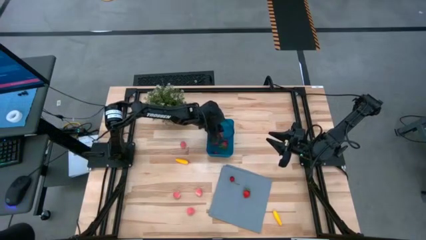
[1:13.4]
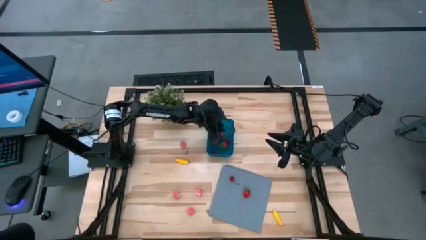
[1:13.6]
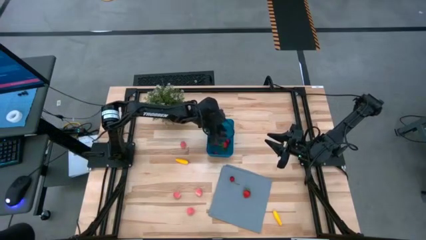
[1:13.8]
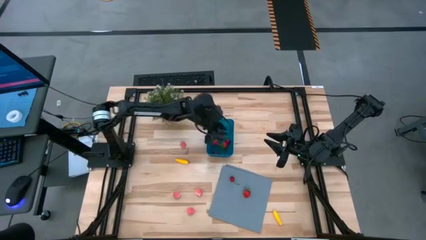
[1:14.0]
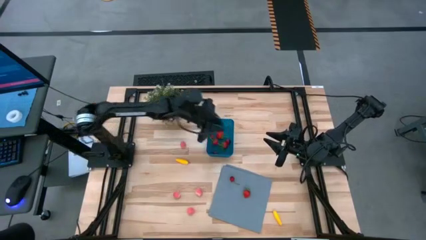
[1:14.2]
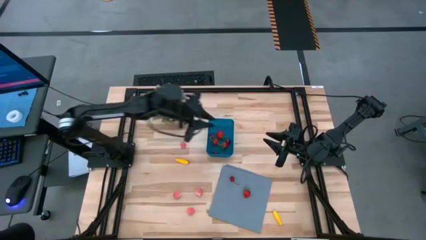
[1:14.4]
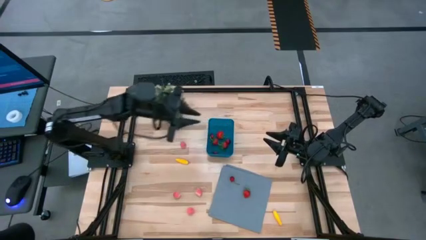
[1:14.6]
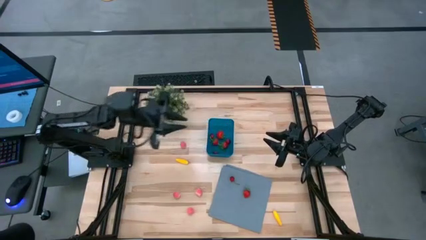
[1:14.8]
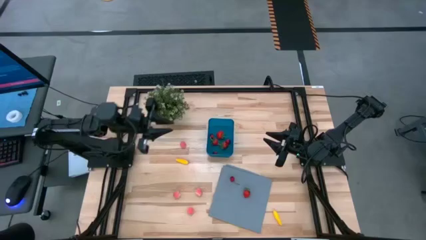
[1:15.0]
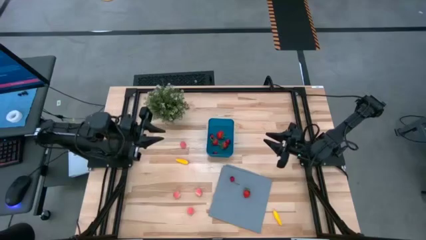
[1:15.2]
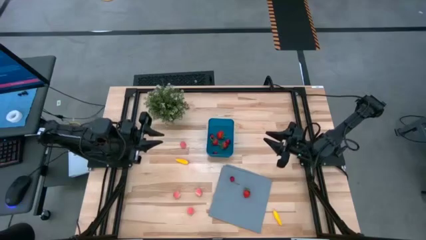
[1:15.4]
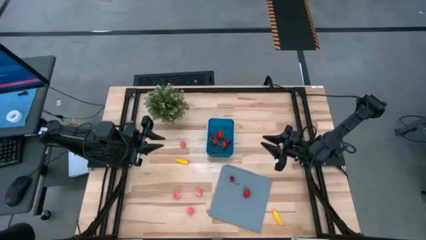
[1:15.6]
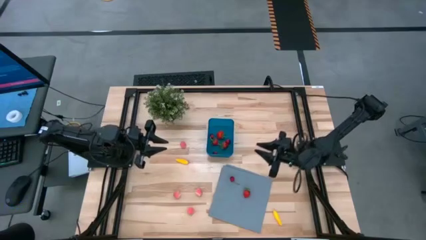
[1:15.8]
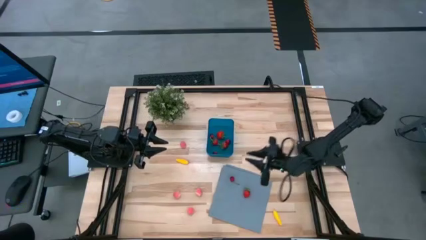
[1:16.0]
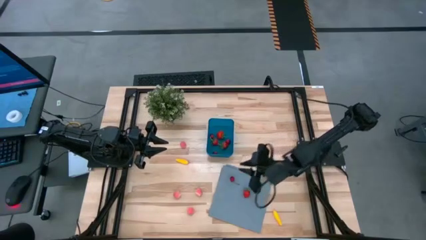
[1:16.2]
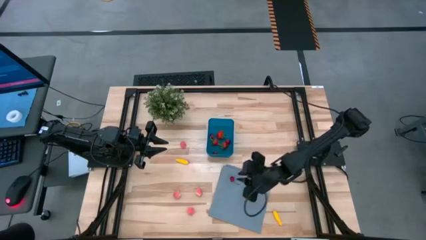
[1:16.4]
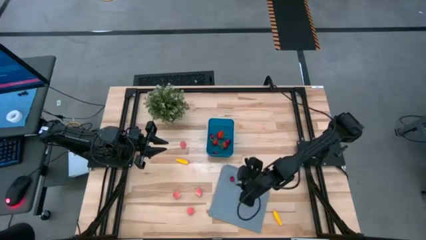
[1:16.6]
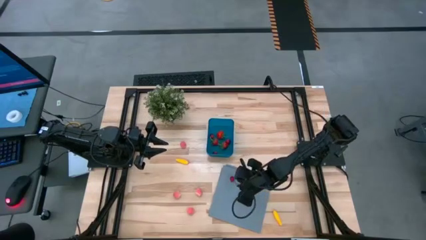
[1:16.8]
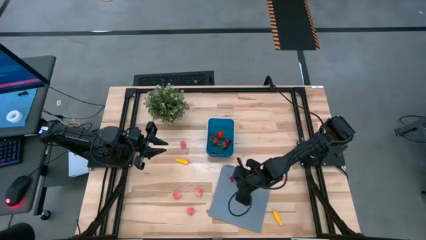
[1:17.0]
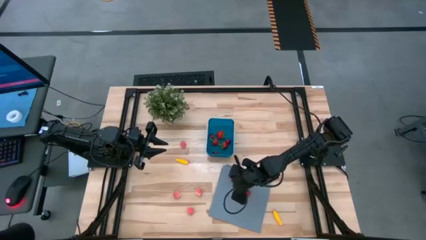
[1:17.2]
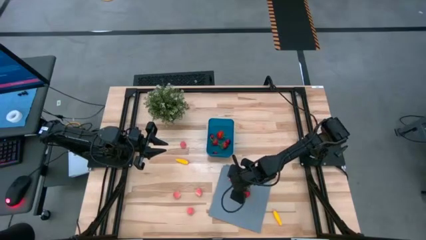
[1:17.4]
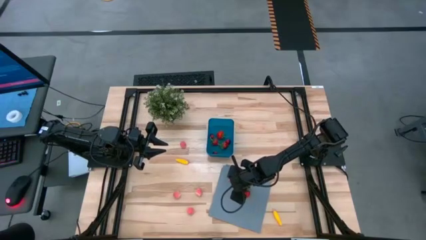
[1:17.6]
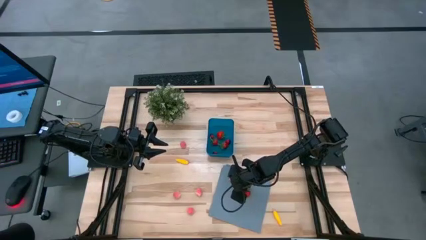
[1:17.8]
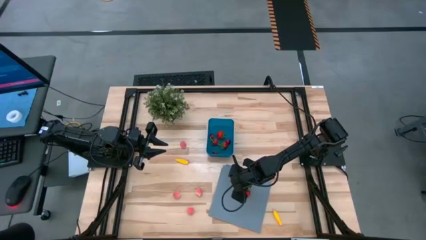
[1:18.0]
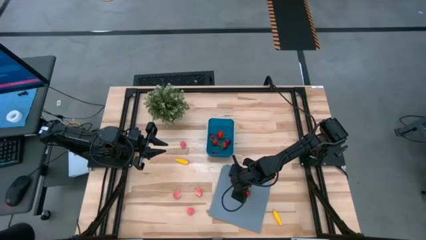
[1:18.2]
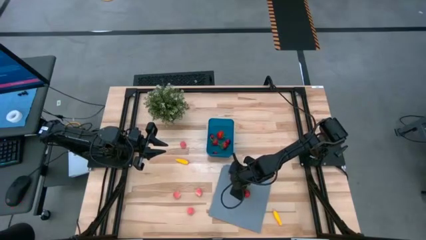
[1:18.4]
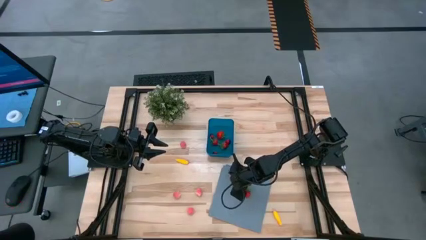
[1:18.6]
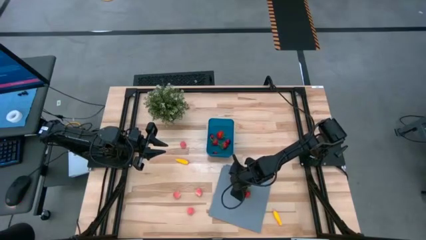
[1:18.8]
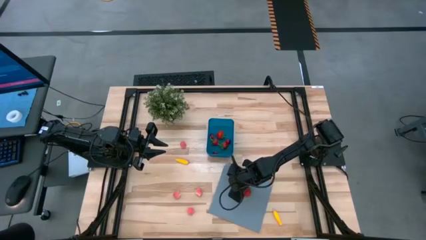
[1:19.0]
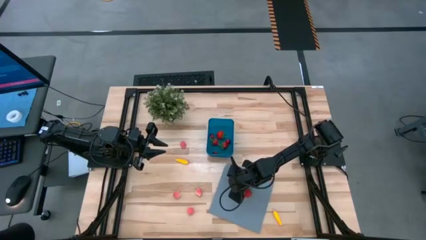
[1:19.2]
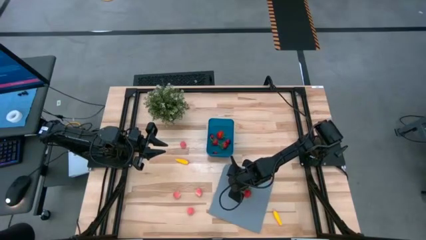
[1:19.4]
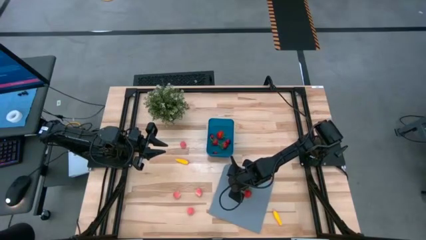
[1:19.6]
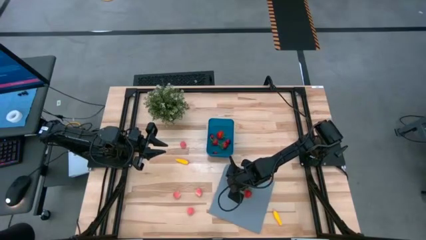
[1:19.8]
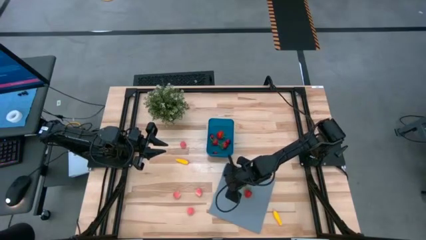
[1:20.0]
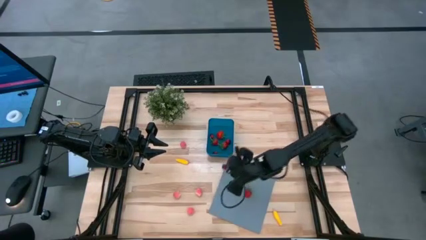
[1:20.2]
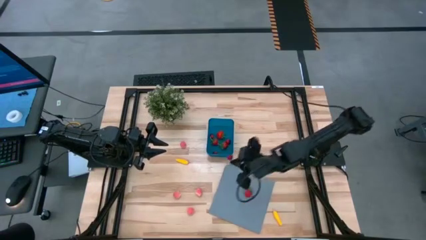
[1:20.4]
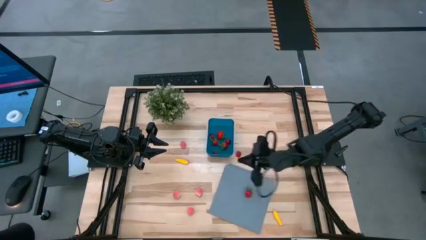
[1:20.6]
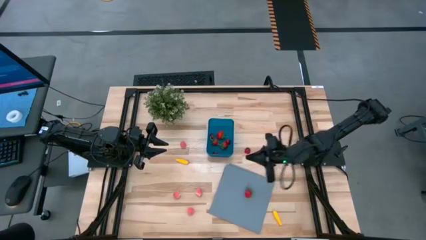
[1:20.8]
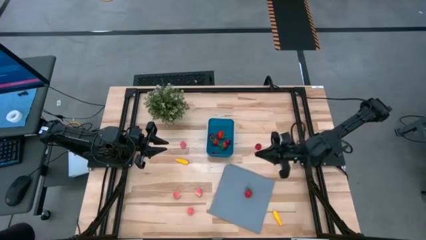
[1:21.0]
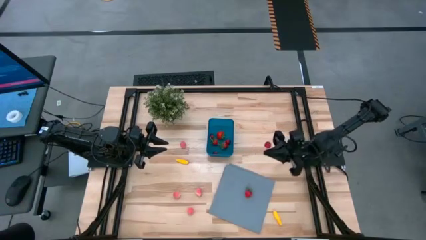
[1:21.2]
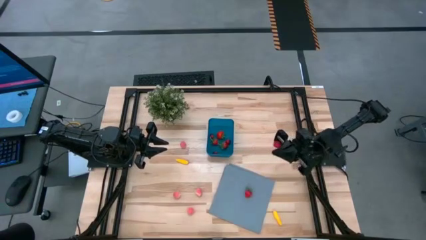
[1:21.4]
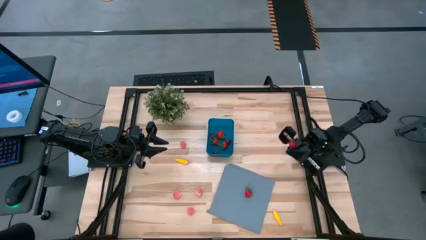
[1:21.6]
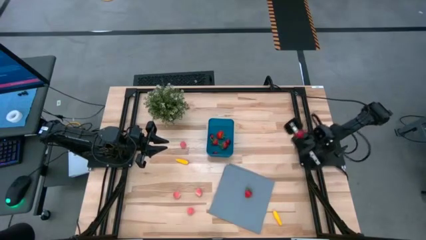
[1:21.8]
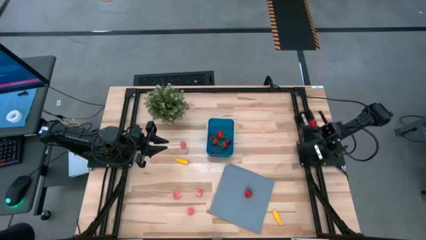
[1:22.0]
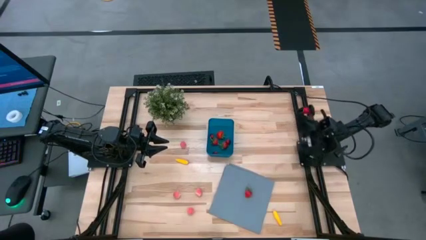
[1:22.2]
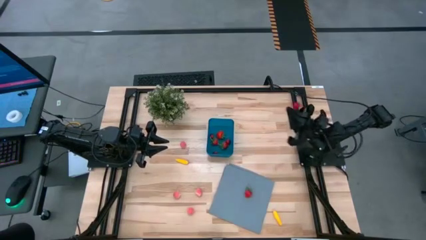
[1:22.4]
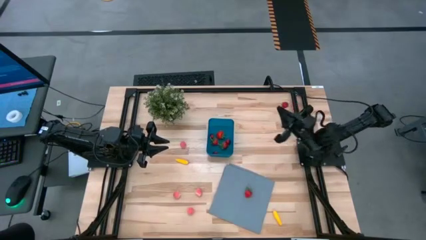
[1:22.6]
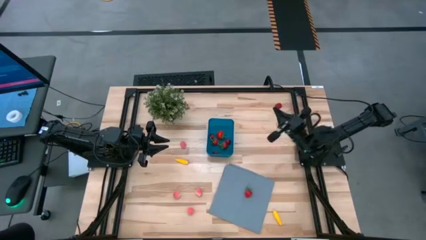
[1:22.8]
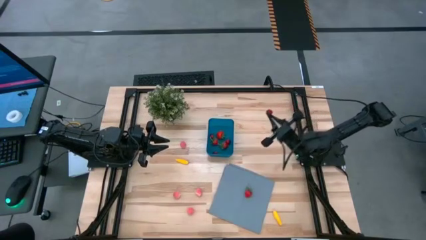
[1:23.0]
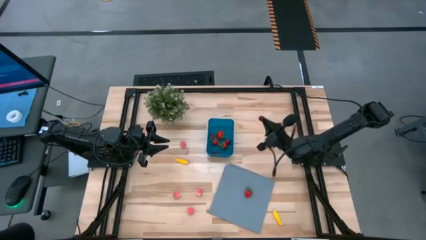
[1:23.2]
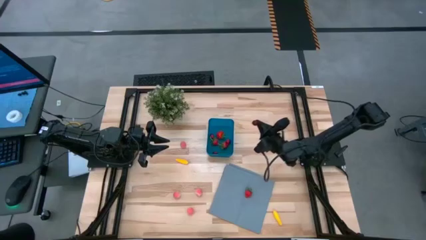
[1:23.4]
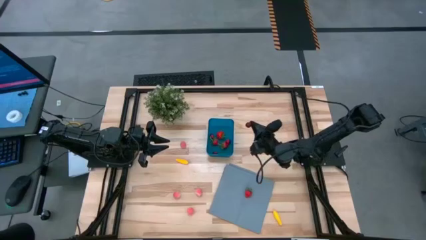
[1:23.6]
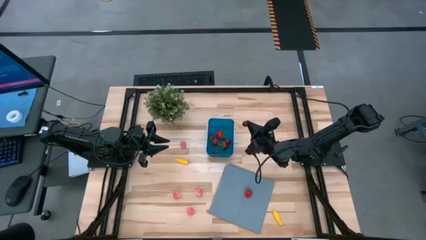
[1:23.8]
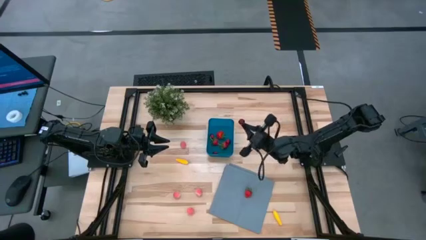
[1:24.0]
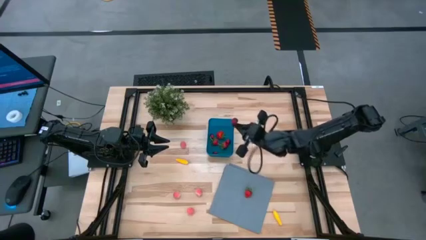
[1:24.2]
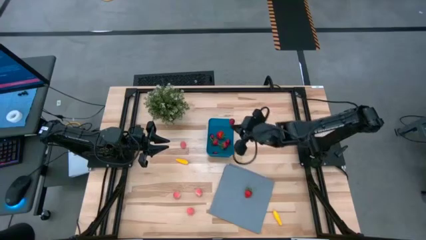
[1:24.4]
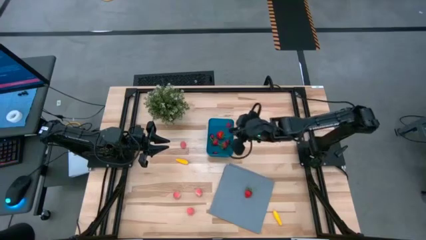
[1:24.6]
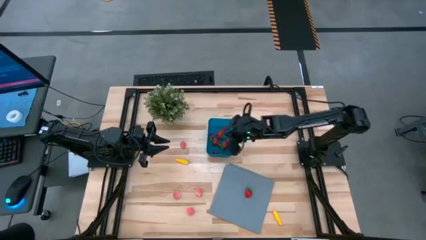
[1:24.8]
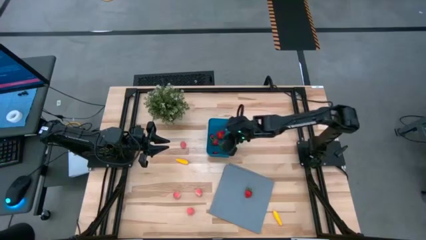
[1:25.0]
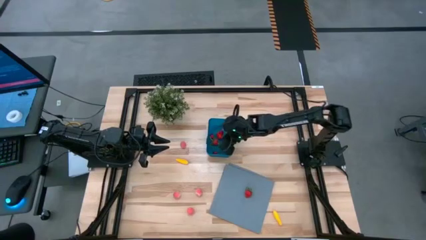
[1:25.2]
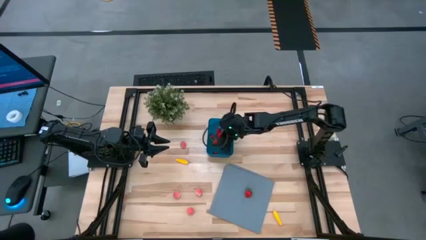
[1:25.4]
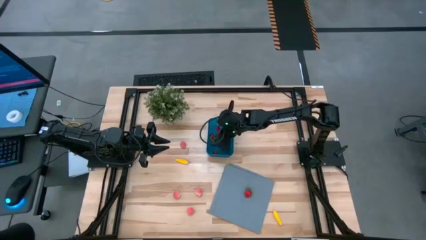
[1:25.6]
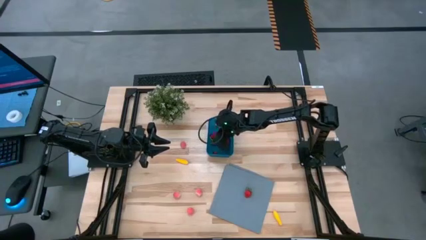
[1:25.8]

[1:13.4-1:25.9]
Task: Pick and placing Produce into tupperware
Put the cherry into the blue bin

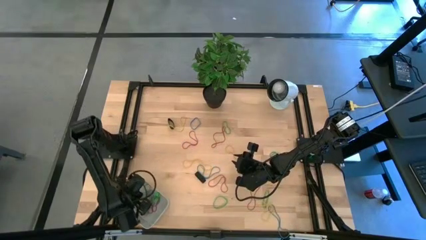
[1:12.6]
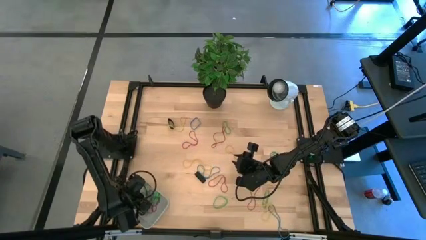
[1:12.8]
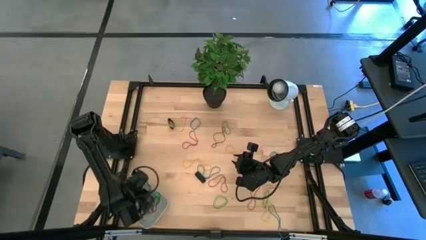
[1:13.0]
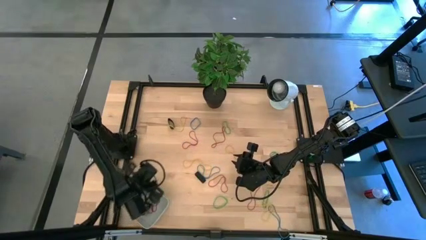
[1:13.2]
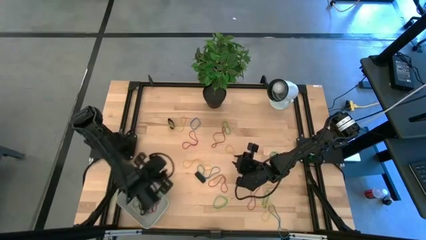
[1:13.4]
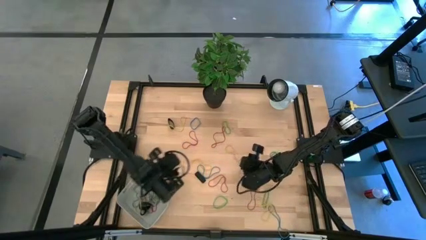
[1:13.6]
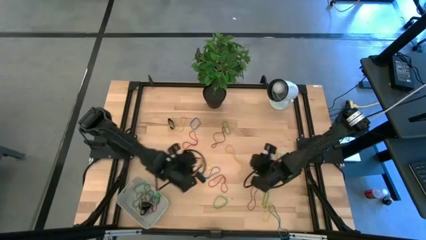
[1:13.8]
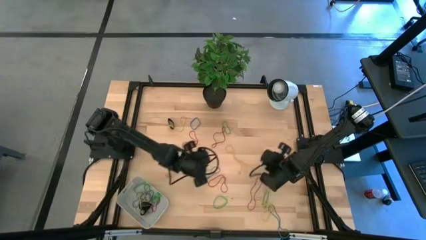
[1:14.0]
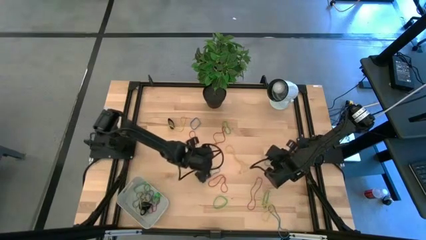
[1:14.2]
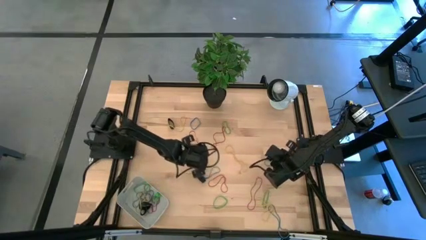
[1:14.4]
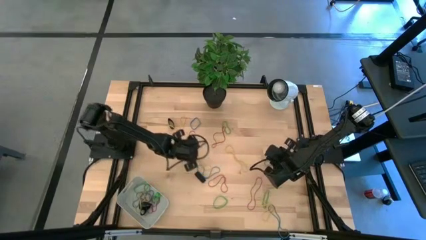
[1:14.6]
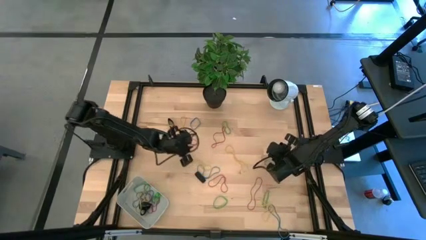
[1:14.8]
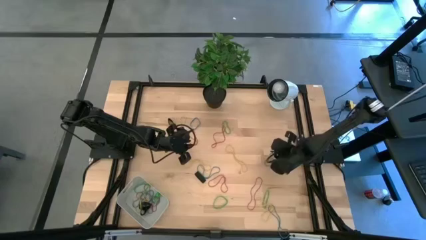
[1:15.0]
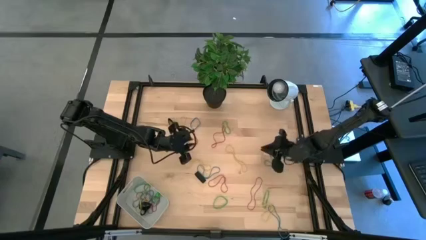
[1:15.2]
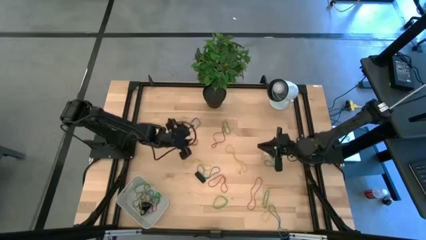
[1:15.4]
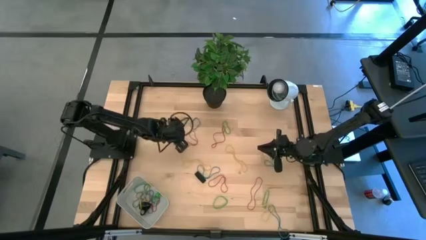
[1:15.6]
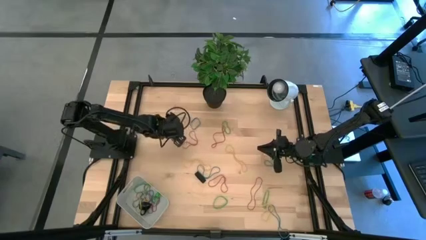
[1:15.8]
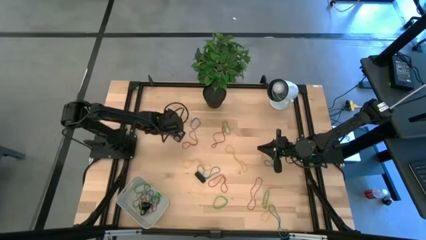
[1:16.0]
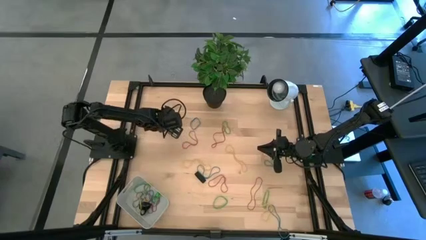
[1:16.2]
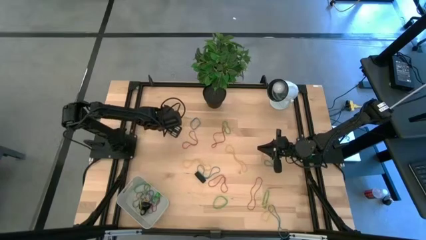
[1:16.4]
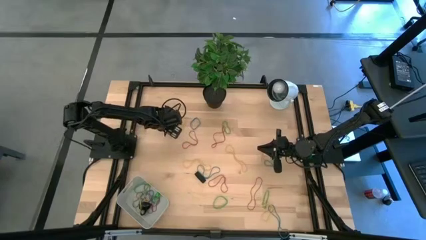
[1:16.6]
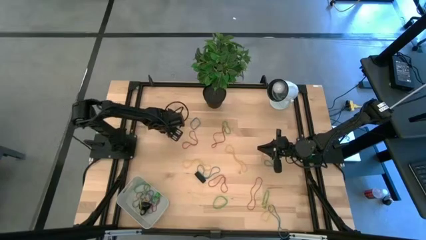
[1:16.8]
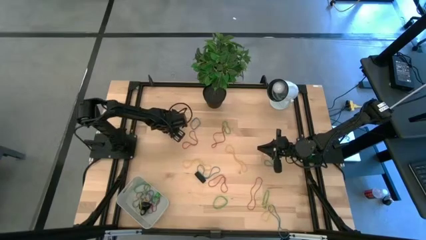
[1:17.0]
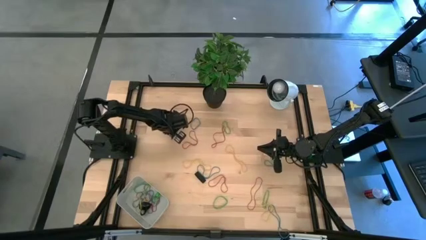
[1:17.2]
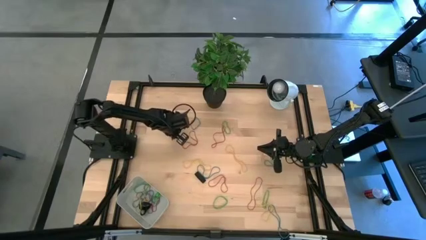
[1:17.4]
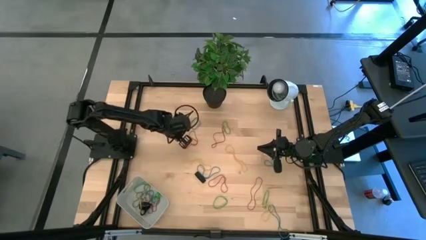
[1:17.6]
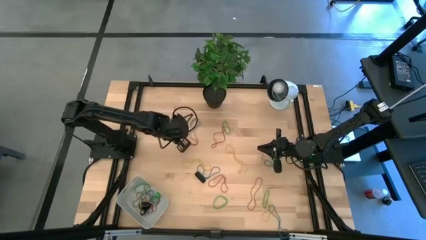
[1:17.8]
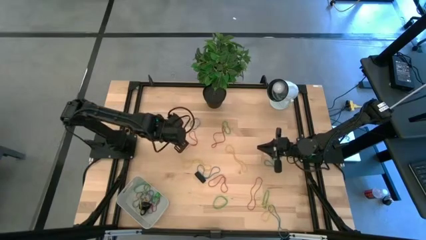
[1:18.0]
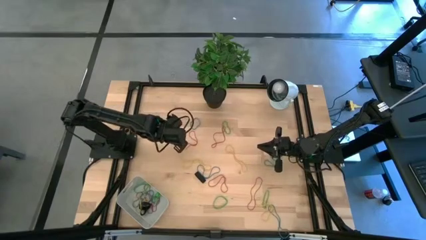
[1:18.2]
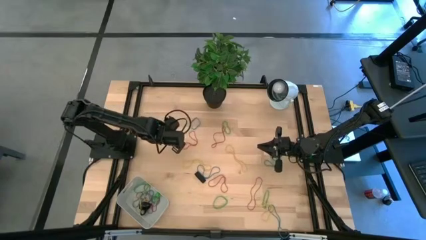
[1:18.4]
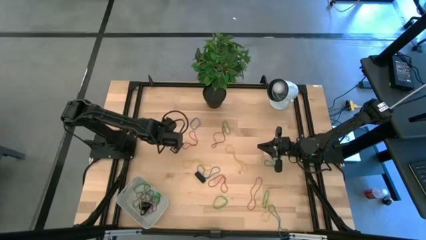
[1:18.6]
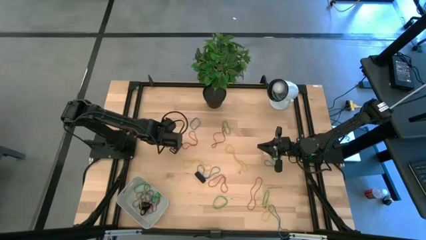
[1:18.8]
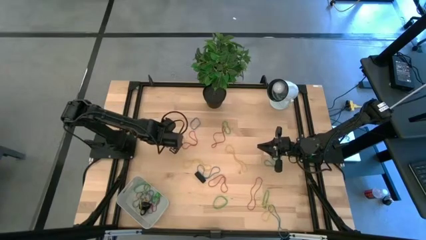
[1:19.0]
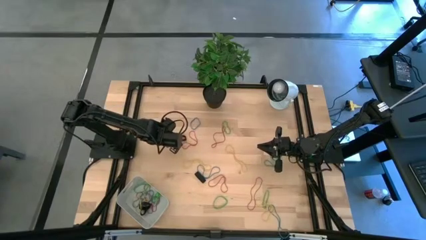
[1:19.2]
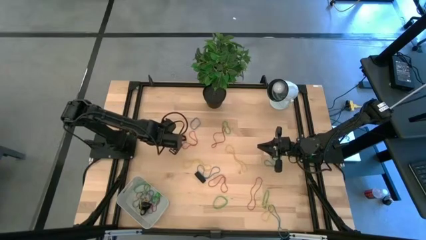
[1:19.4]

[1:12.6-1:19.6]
Task: Pick and place rubber bands into bin
Put the yellow rubber band into the gray bin
